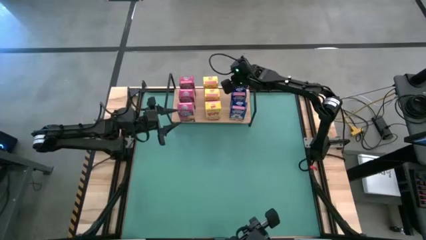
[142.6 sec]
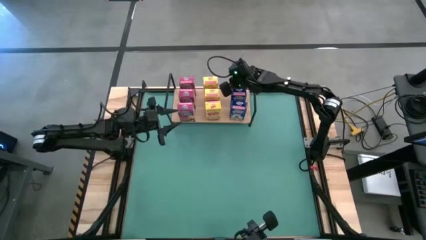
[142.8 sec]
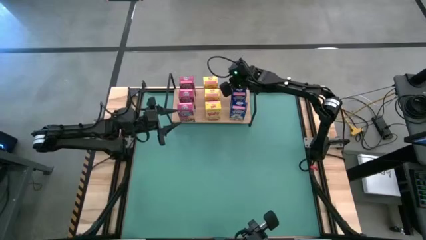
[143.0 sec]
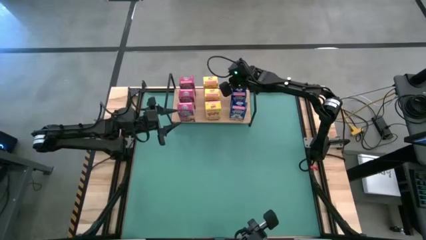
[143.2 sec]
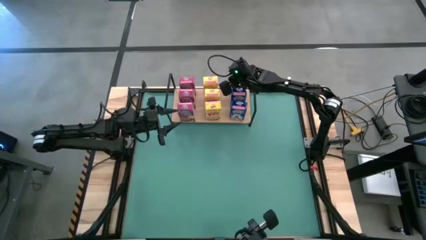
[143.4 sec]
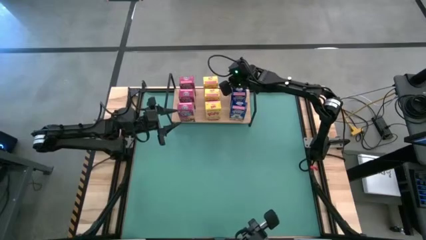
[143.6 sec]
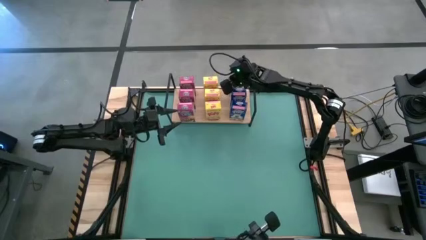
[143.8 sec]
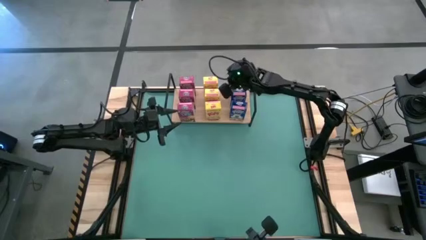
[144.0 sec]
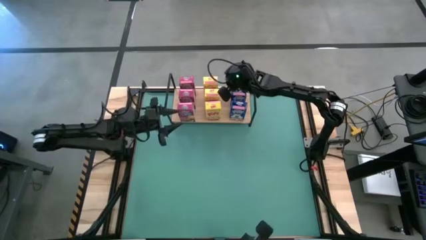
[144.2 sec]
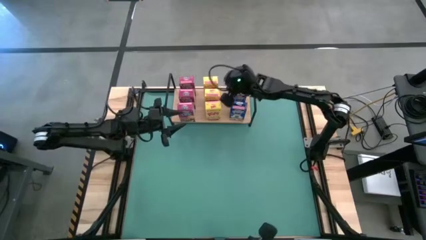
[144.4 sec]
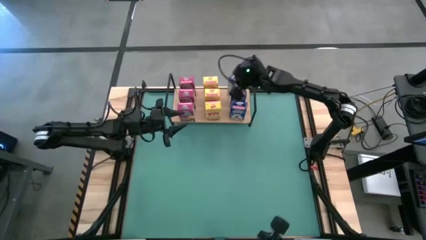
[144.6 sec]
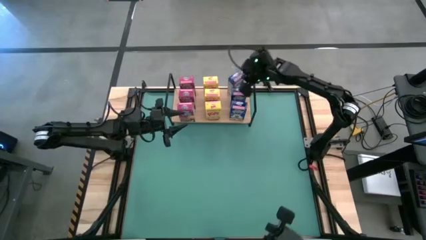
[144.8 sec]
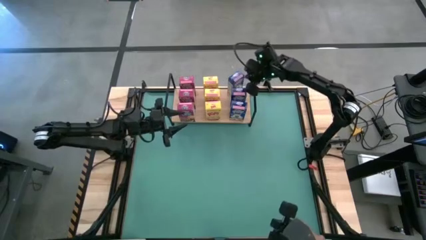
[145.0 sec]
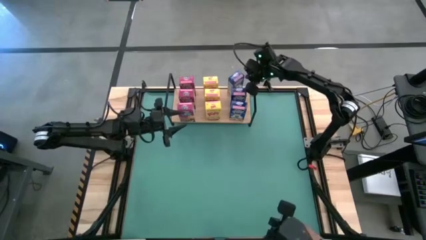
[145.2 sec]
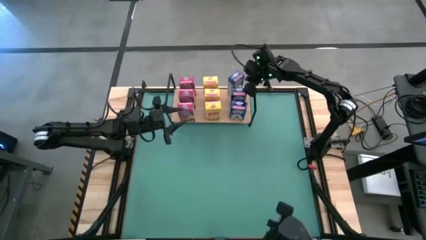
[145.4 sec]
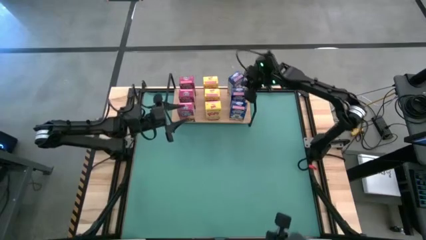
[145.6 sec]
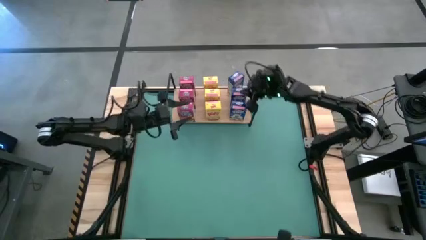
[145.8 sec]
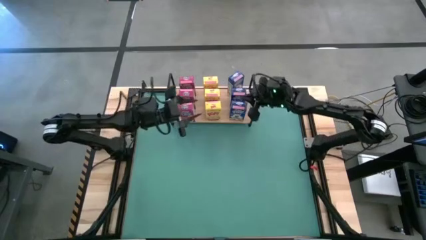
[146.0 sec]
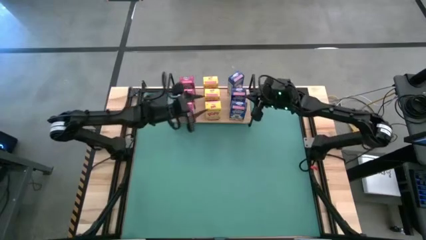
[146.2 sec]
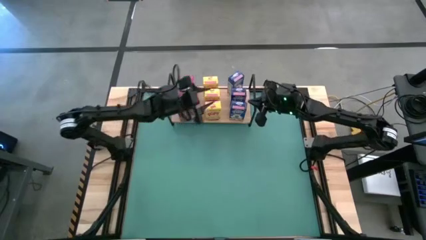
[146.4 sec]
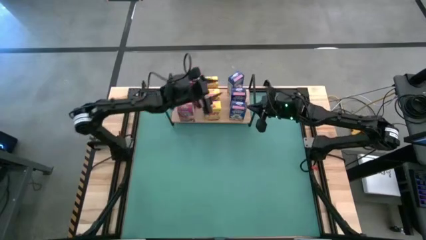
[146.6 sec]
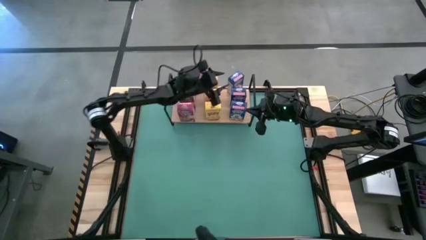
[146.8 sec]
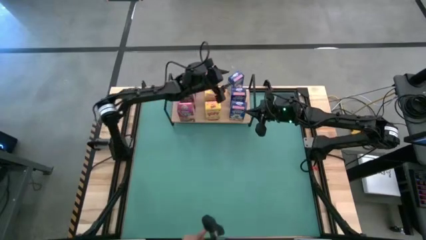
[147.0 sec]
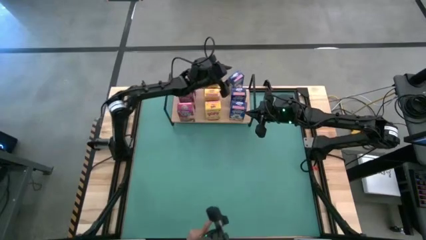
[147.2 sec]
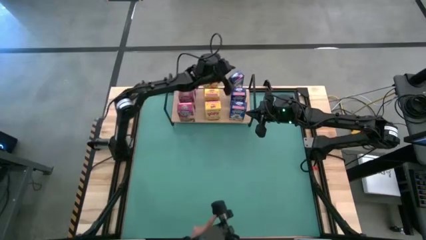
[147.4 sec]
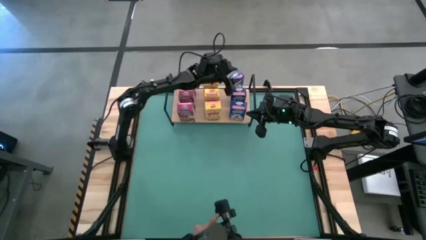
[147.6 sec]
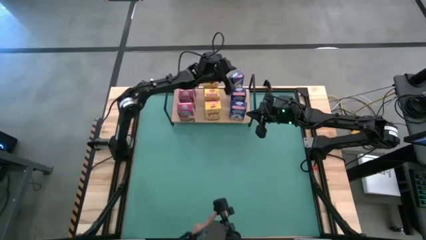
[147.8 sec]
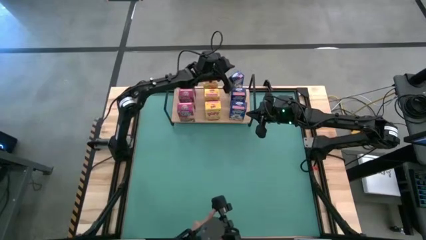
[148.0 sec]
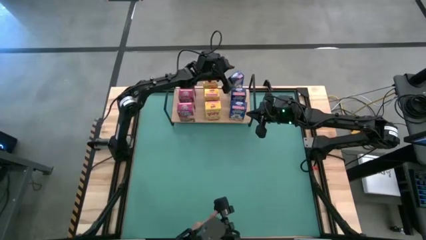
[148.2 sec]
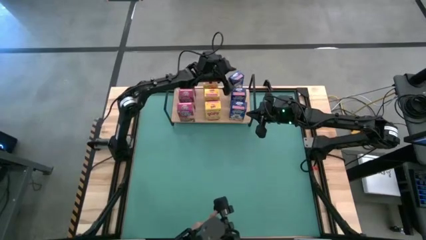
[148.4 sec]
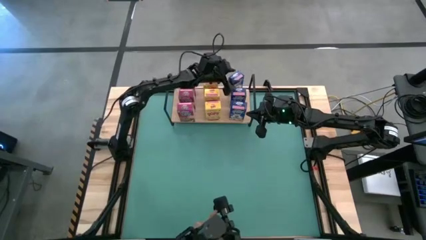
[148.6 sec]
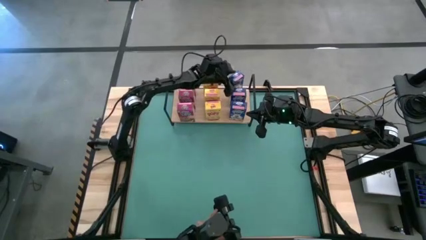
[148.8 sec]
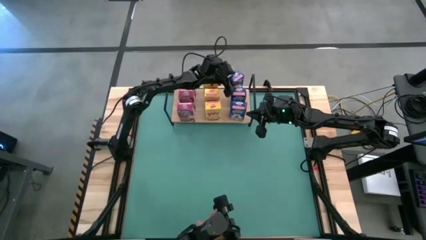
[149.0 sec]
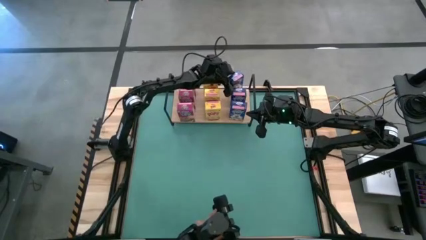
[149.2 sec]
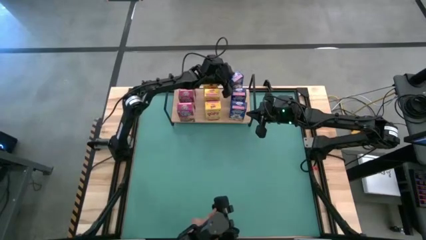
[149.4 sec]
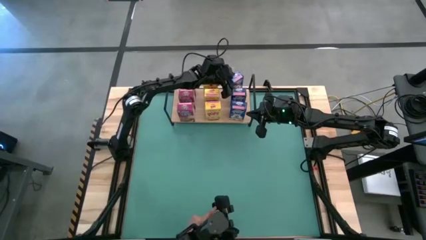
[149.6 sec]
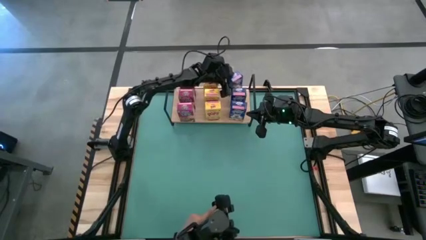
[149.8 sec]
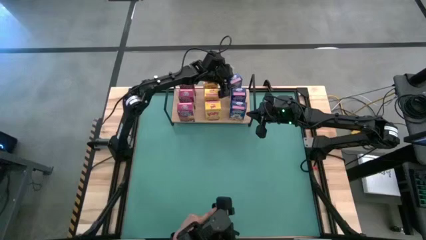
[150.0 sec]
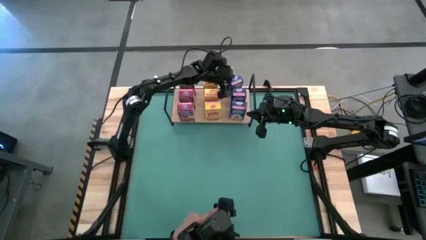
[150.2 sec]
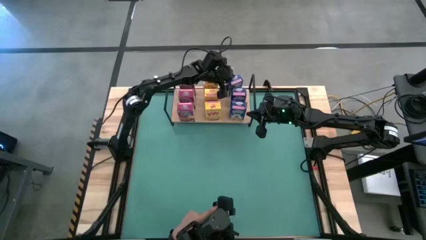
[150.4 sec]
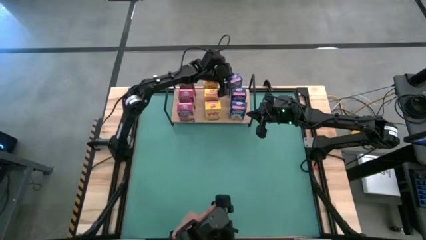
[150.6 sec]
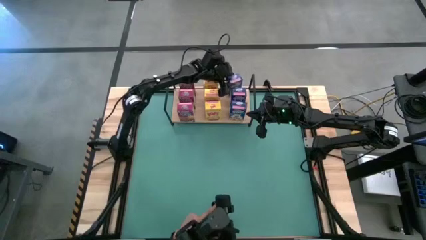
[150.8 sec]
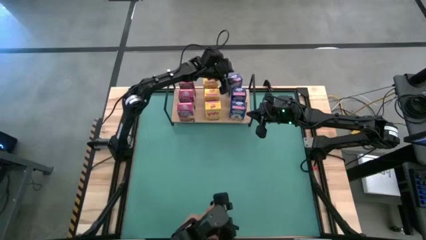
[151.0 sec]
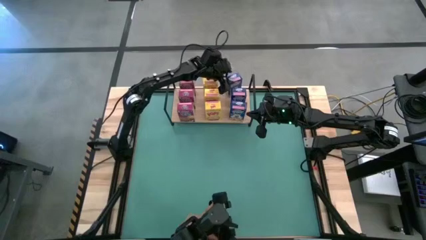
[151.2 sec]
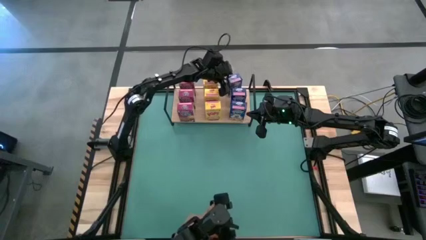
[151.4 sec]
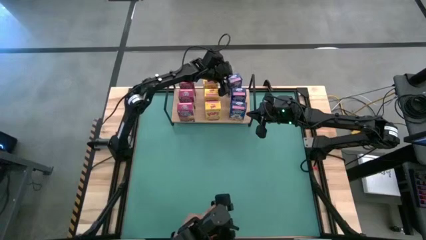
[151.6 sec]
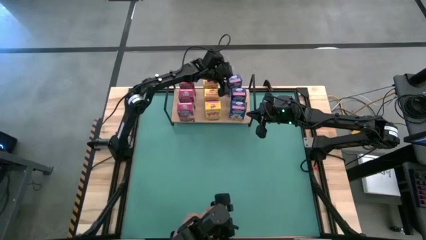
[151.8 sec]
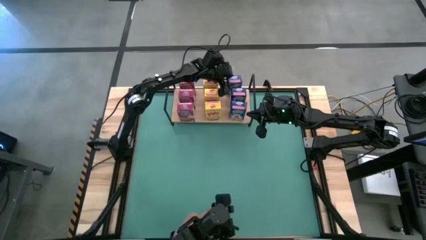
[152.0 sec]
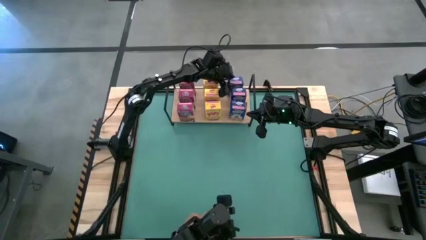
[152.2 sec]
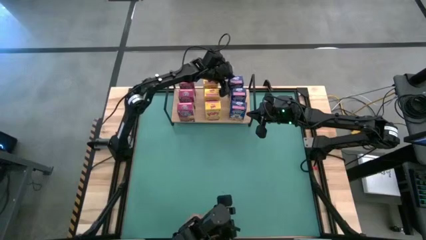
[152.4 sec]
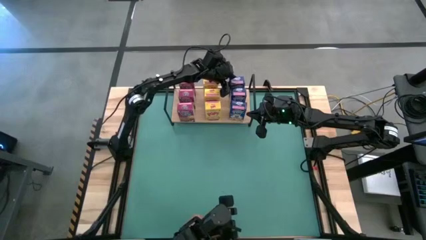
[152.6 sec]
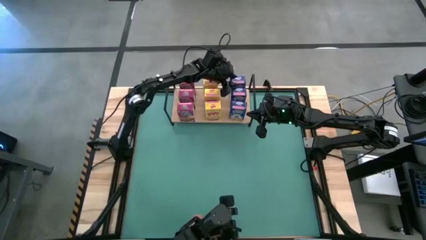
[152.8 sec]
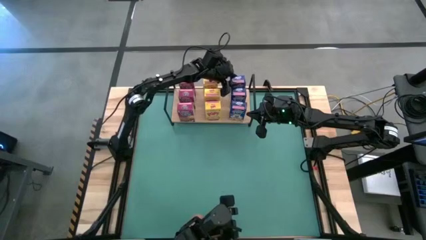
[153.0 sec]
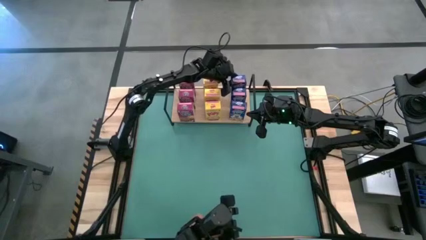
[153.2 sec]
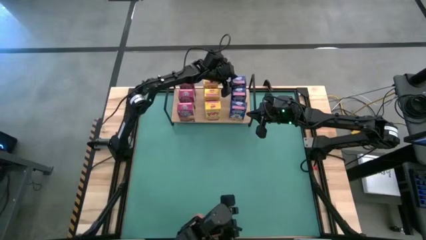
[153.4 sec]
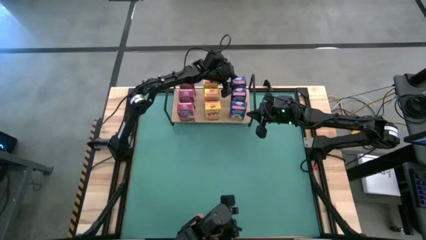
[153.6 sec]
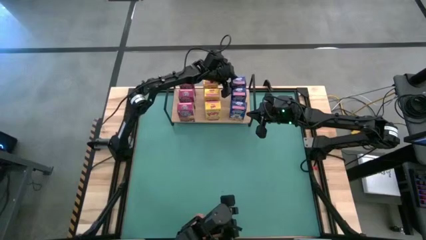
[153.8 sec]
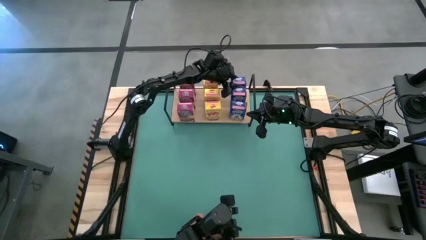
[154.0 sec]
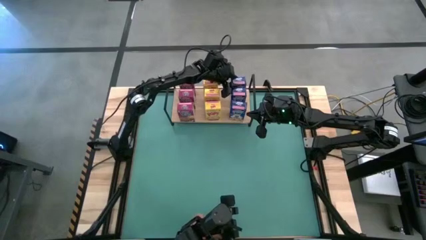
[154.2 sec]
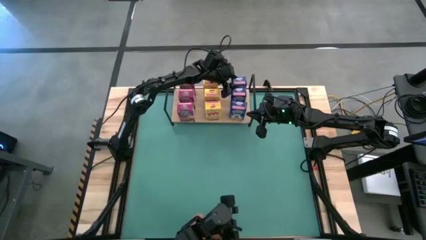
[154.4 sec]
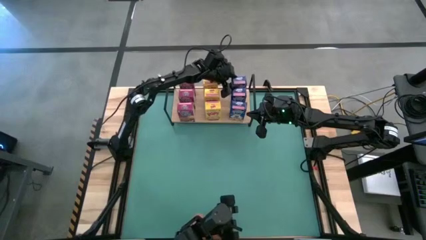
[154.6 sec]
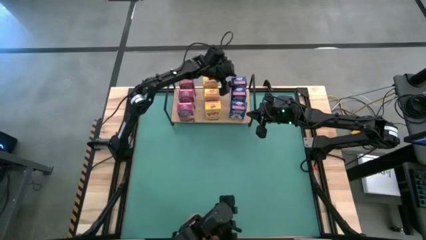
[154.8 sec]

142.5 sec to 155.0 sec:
Task: Stack cereal on shelf
Adjust the blue cereal boxes on the shelf

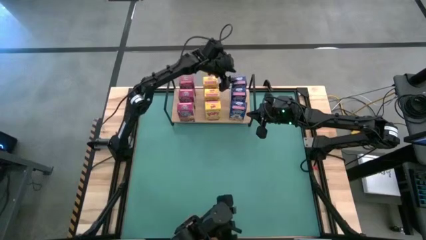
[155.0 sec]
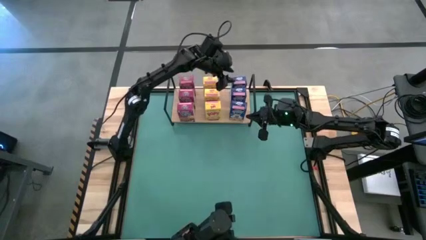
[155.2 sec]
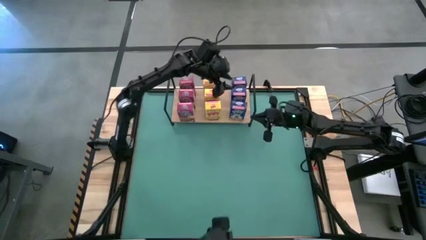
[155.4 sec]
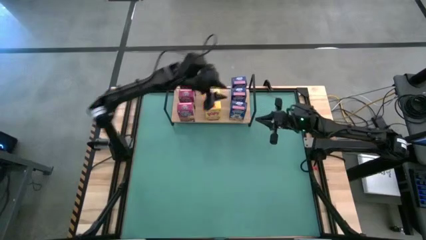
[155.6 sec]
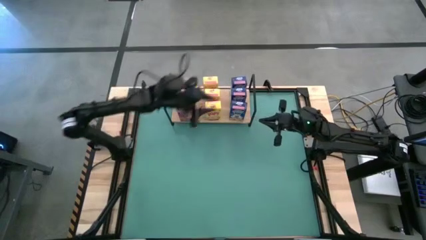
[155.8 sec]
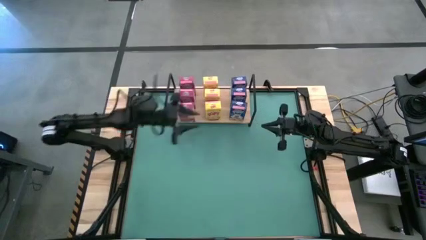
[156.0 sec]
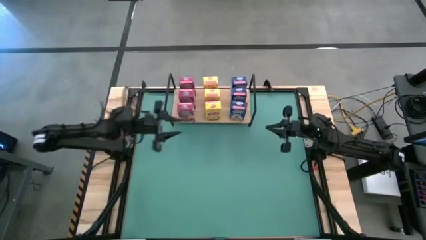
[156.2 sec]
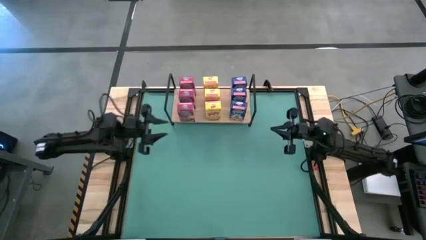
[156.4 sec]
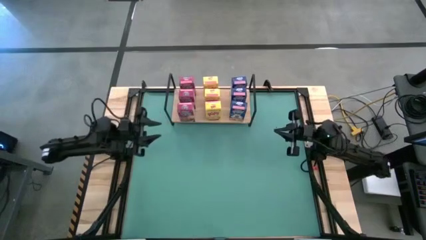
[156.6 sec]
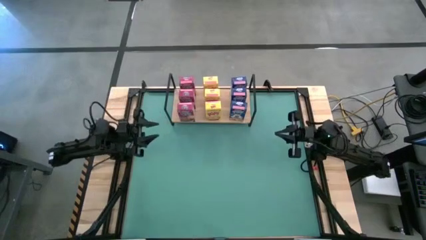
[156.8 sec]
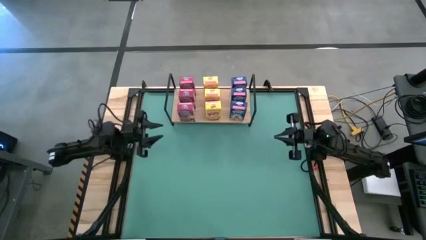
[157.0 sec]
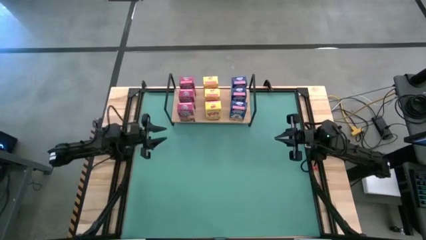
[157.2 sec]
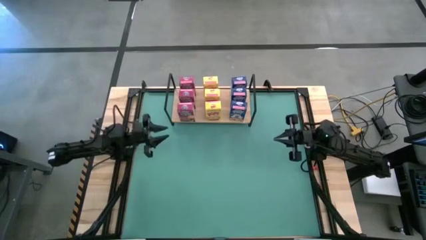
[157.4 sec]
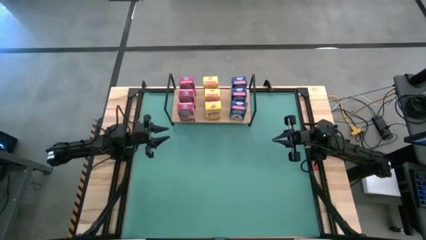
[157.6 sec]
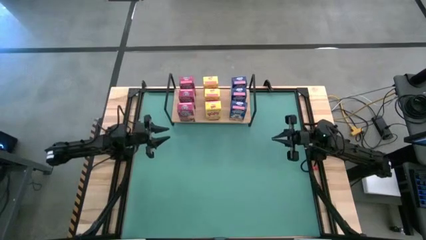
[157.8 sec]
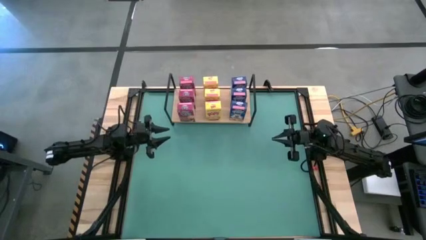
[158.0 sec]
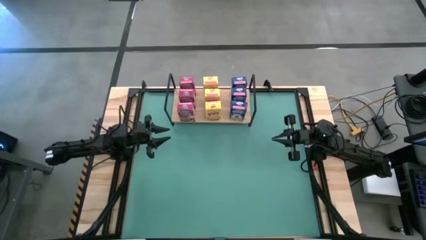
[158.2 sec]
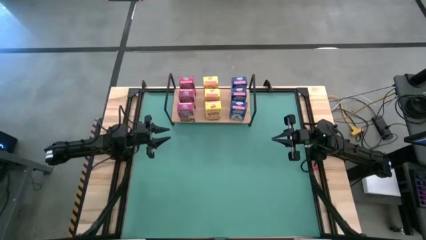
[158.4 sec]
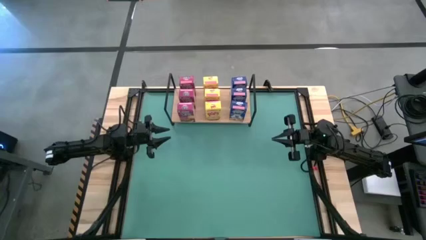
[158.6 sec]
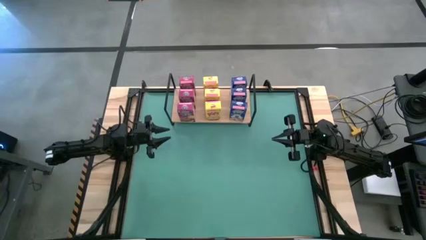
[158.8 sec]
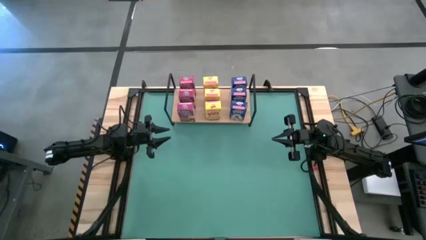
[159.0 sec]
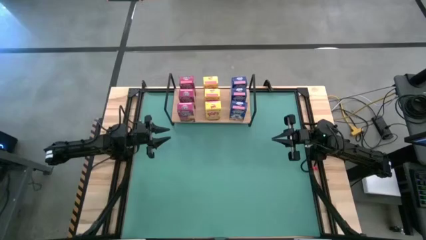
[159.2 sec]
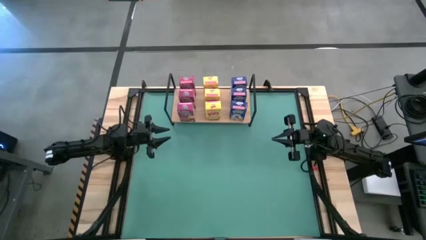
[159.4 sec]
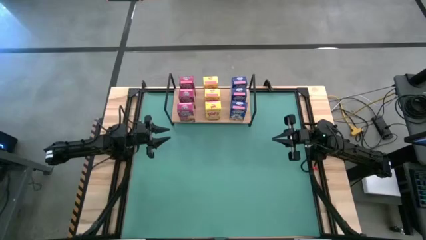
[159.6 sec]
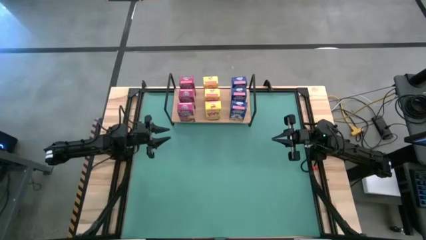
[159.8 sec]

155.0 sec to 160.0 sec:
Return to Home Position
